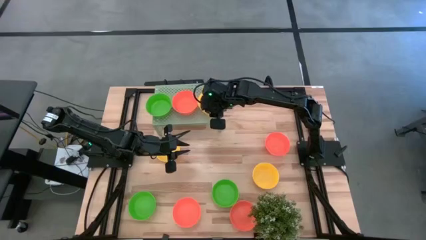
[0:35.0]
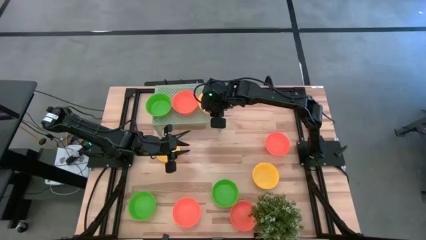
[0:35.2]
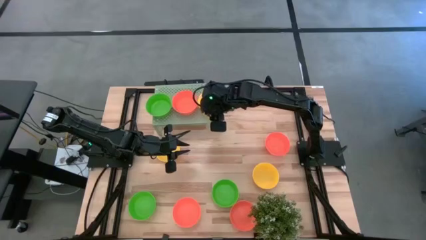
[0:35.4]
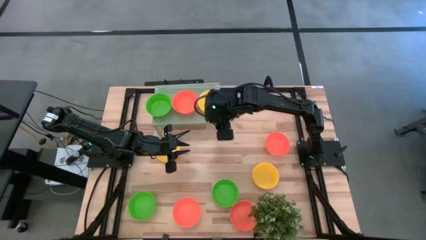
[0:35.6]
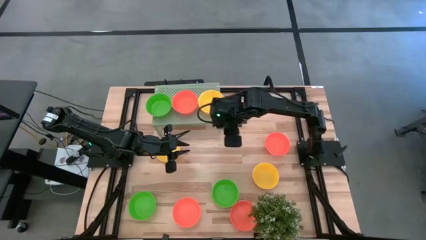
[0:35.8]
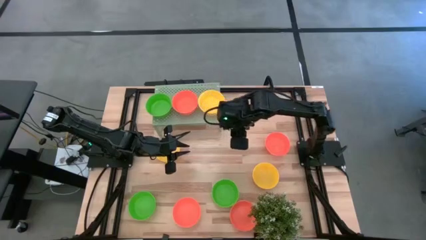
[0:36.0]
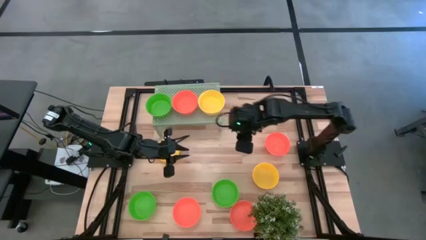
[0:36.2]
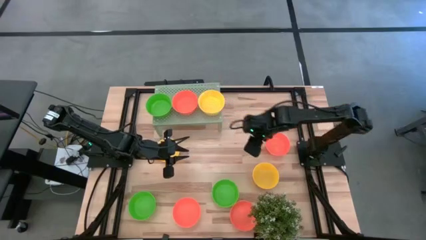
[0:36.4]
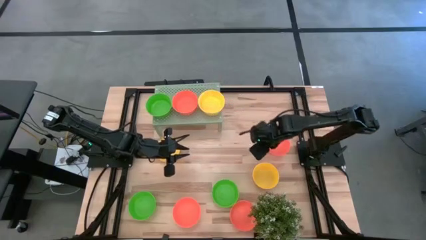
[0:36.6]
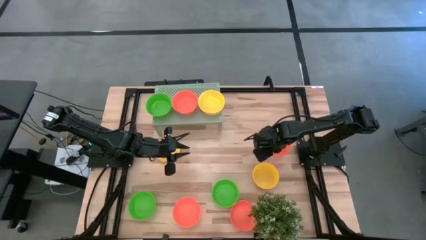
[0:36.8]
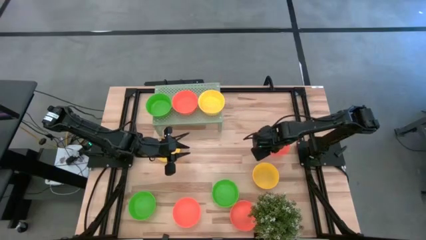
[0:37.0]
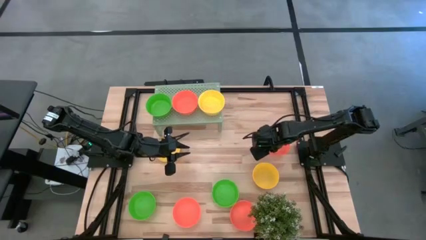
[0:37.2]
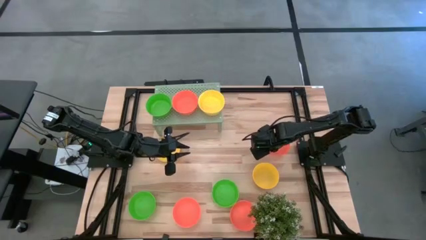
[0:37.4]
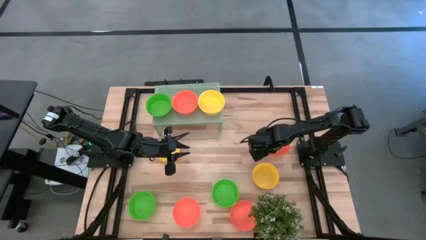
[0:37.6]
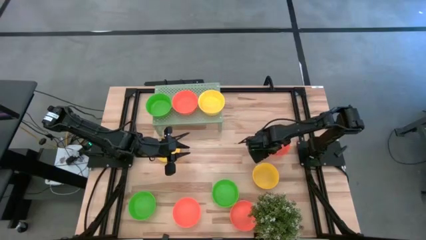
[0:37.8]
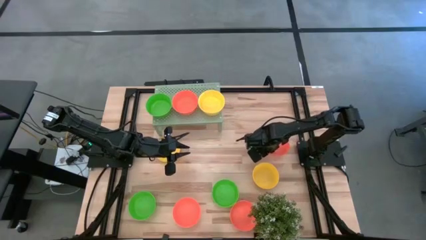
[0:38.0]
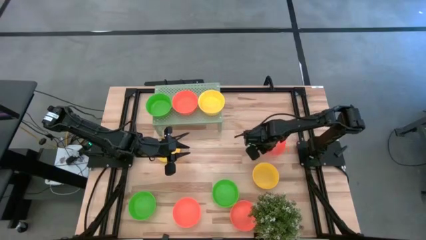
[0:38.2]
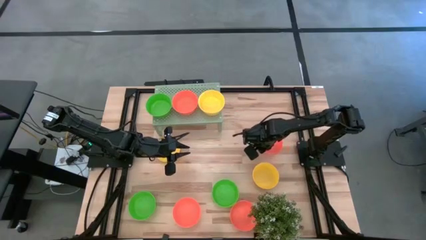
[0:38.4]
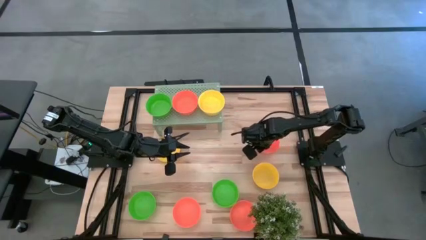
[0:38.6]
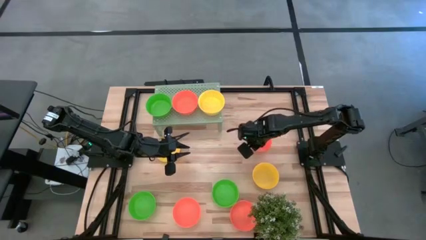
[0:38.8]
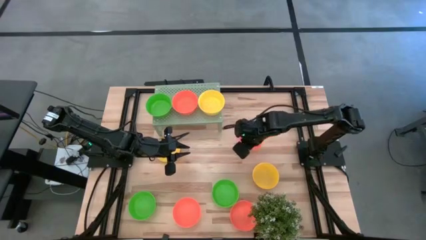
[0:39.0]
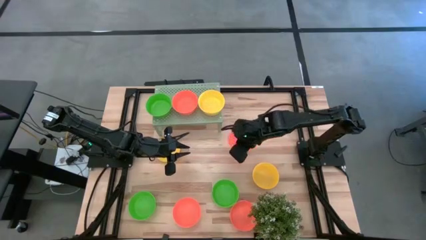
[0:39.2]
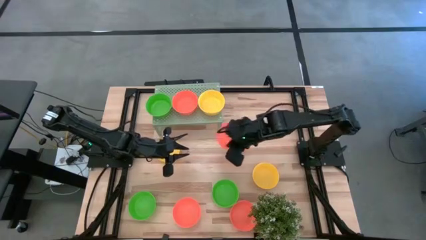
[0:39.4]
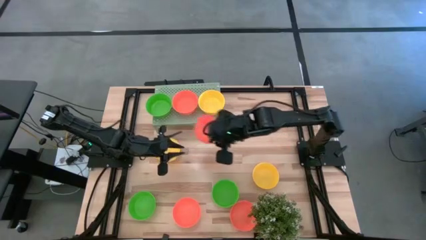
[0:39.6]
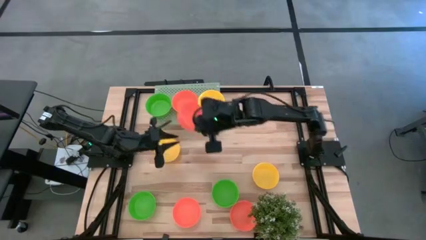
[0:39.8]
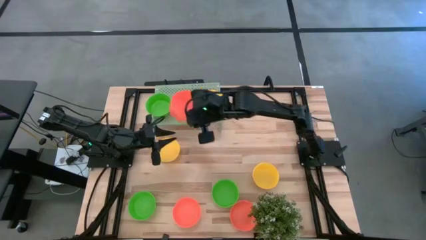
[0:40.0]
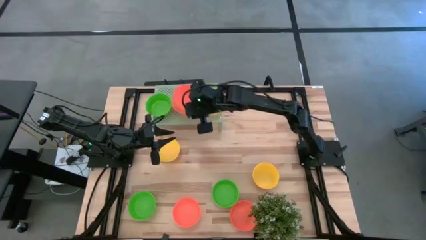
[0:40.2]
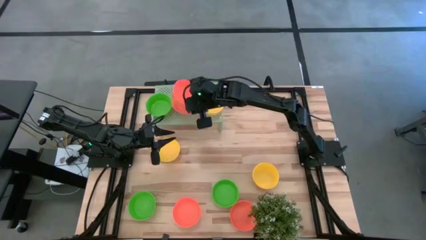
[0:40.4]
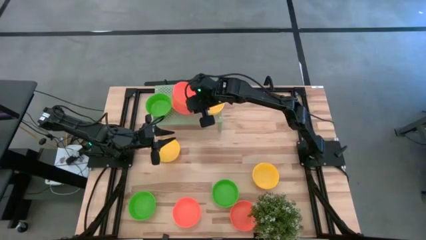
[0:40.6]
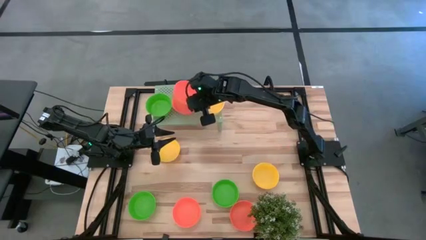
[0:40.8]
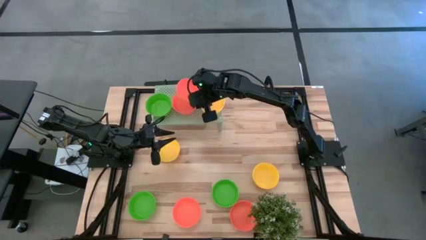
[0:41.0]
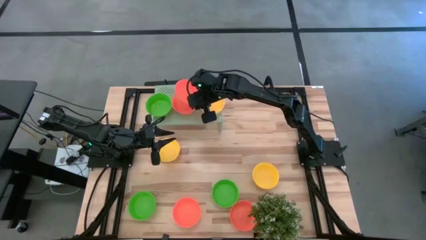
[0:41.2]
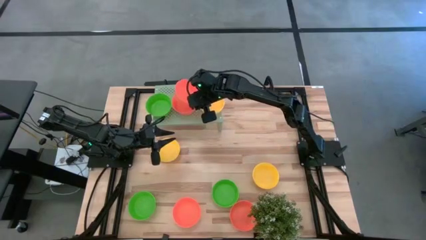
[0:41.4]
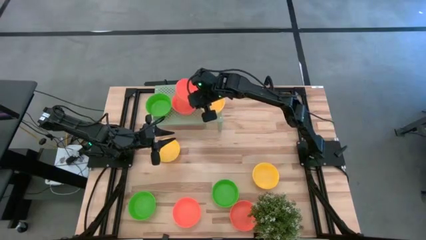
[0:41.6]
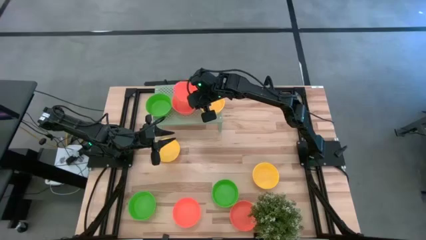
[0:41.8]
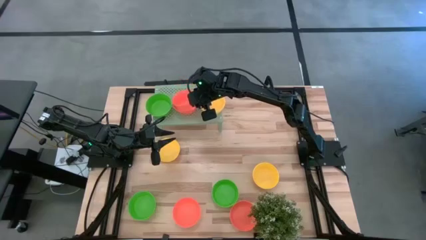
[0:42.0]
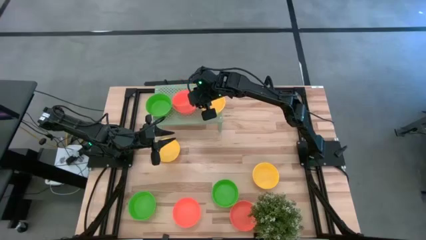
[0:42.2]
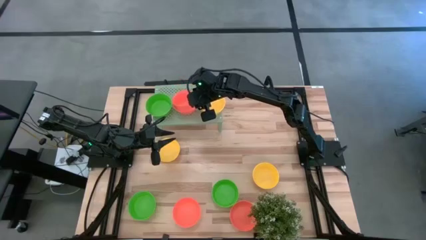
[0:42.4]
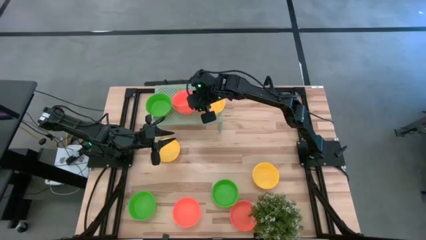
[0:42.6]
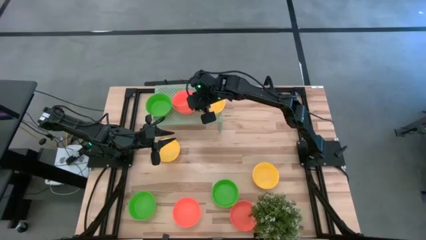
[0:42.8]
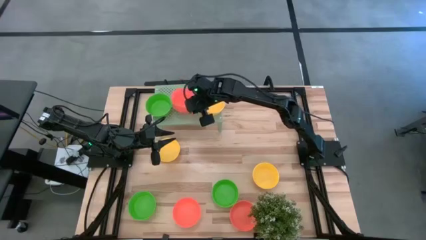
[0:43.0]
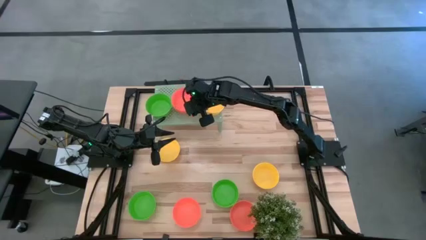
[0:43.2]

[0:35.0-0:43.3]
Task: Pick & Place Mini bowls
Stack the orange bowl on the orange bowl on the shelf

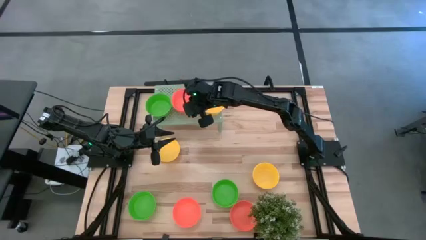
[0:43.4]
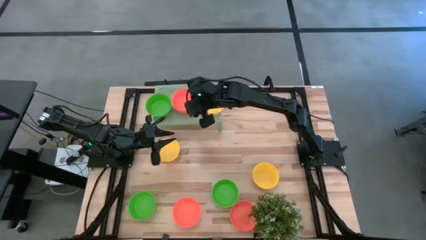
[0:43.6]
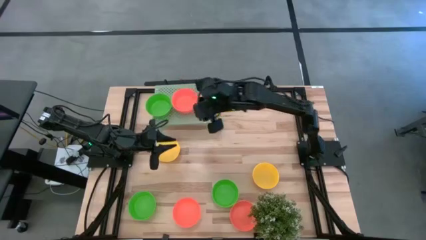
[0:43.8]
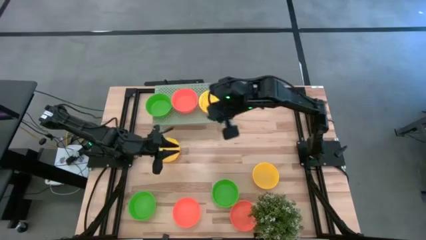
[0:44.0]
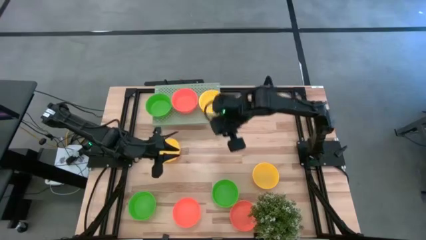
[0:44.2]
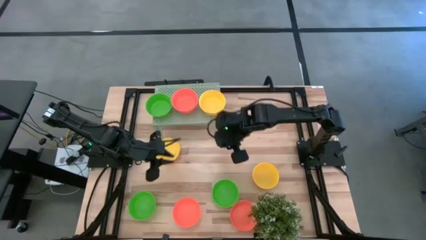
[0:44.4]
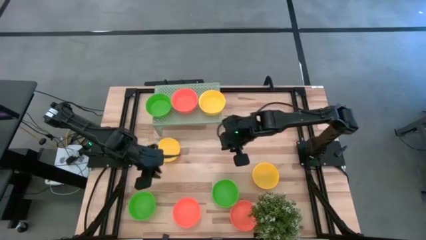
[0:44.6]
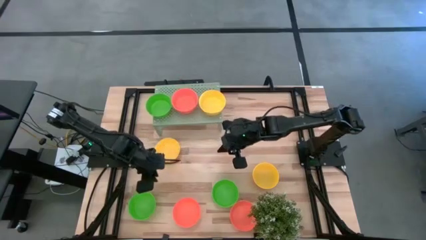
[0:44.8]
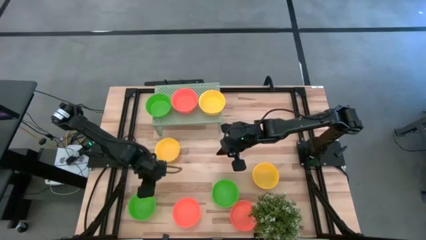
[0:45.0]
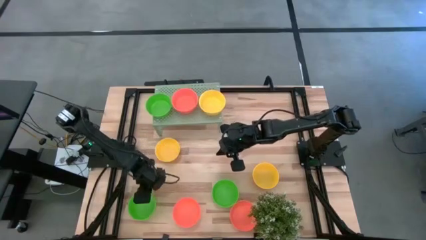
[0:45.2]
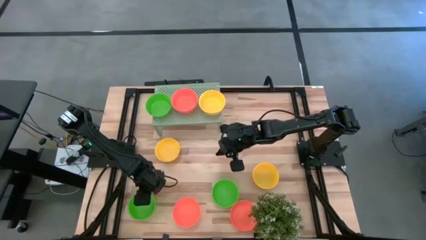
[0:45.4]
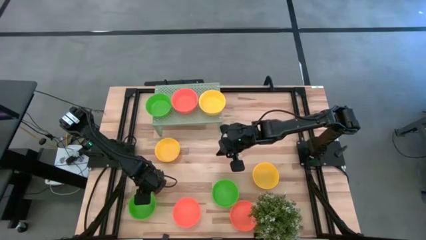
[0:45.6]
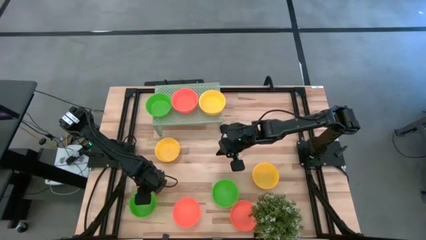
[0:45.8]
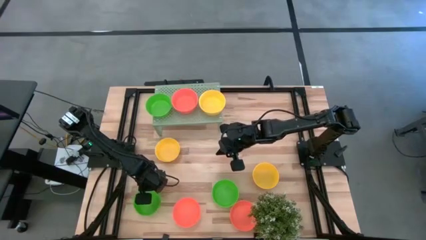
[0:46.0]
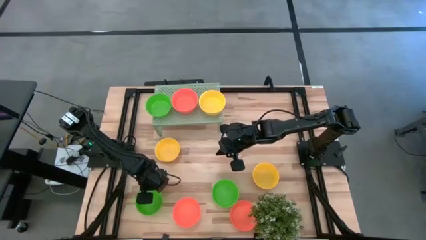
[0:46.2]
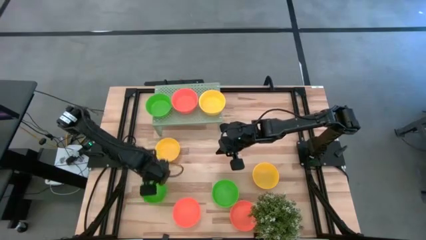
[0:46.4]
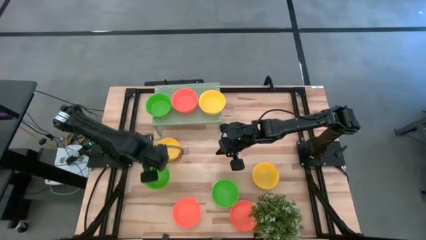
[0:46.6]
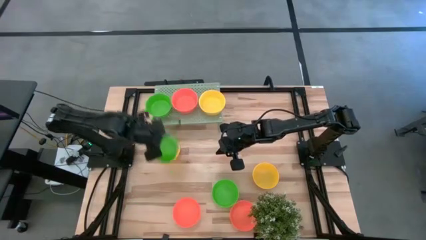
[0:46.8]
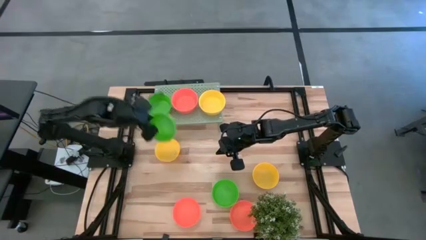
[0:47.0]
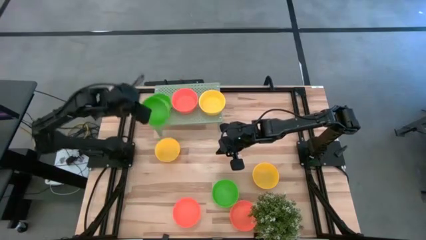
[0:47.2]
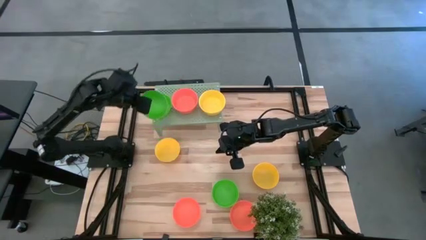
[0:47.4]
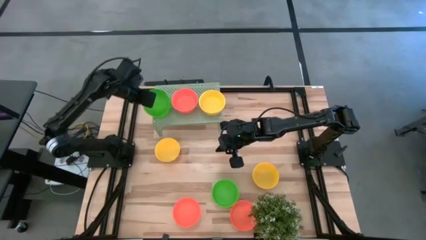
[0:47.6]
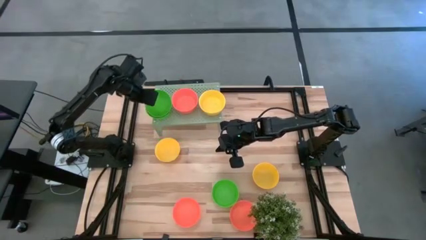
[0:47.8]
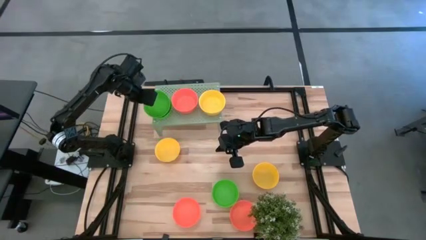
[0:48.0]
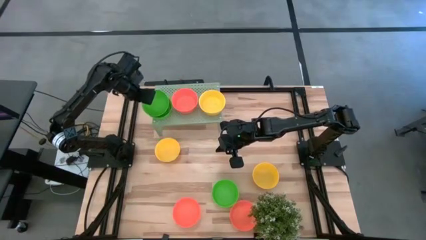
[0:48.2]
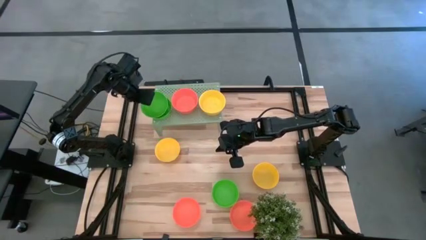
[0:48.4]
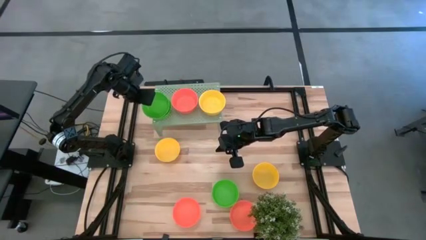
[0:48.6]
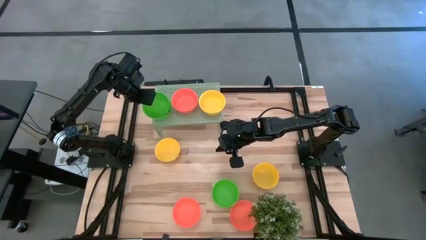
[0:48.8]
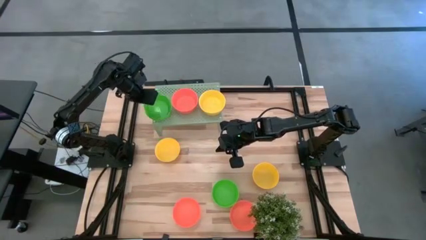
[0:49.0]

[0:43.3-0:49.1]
Stack the green bowl on the green bowl on the shelf

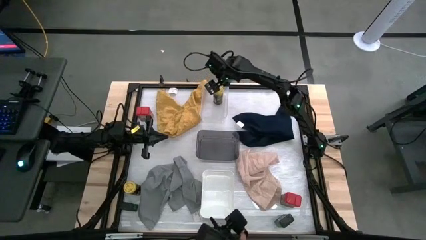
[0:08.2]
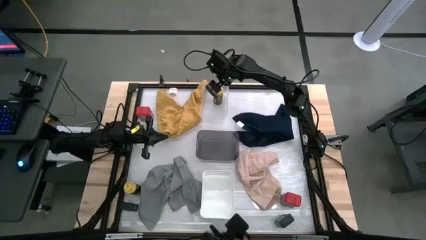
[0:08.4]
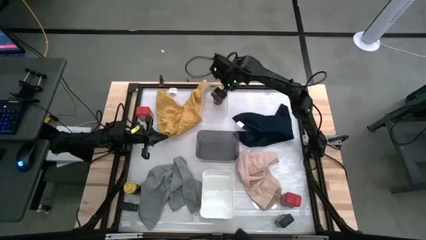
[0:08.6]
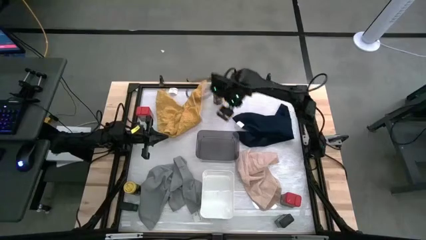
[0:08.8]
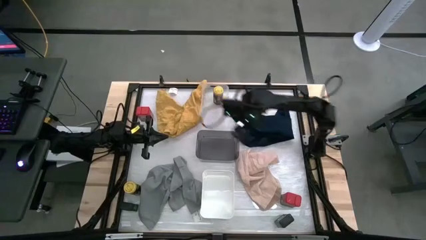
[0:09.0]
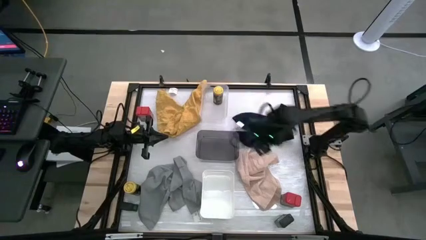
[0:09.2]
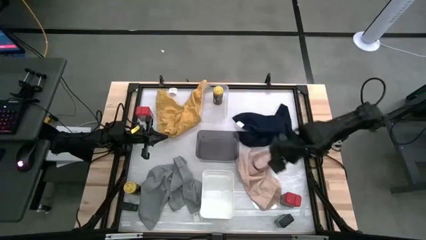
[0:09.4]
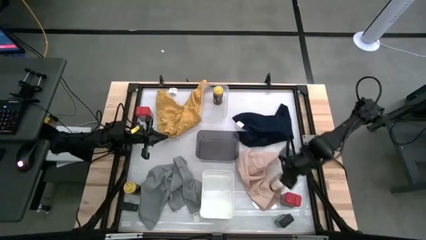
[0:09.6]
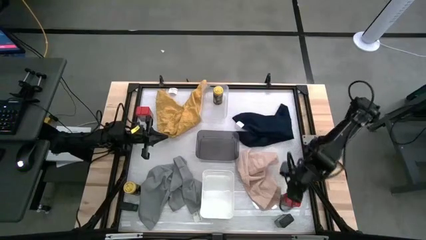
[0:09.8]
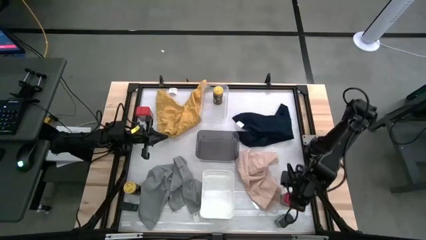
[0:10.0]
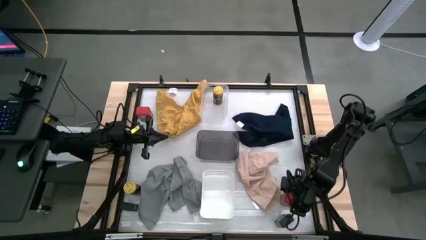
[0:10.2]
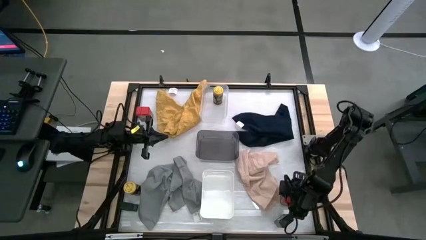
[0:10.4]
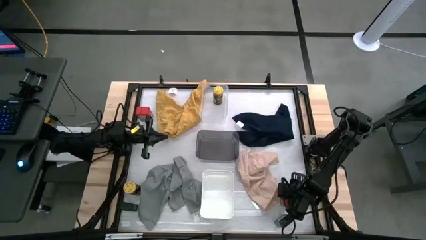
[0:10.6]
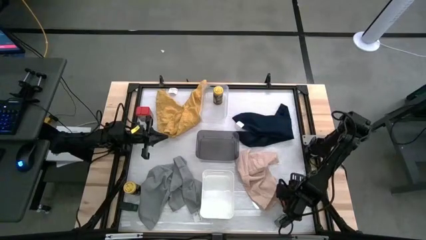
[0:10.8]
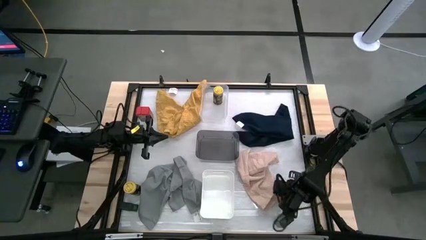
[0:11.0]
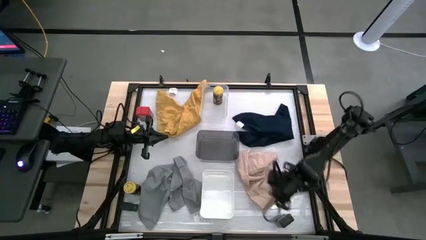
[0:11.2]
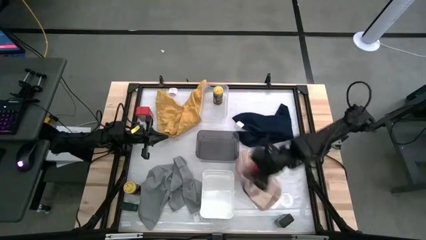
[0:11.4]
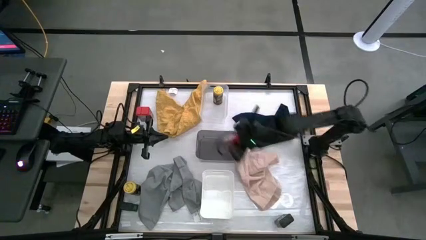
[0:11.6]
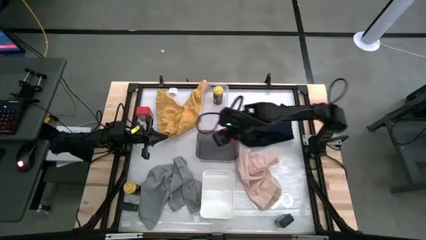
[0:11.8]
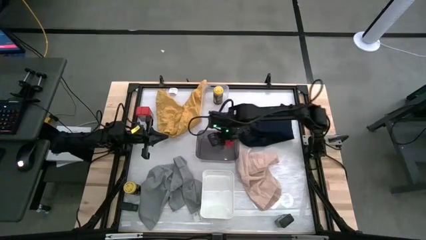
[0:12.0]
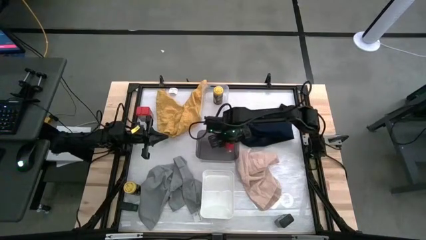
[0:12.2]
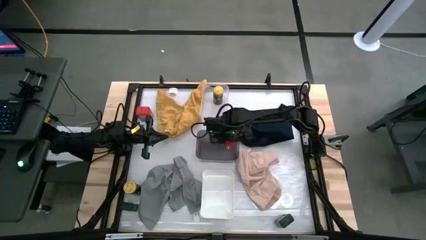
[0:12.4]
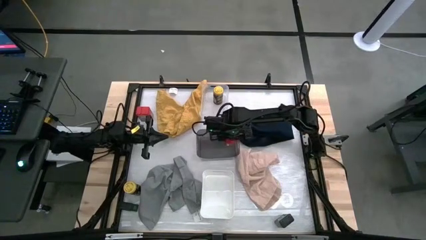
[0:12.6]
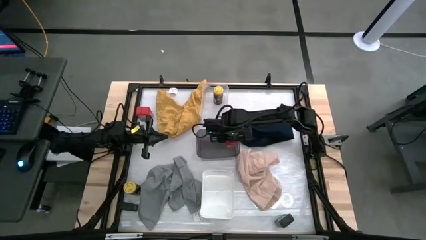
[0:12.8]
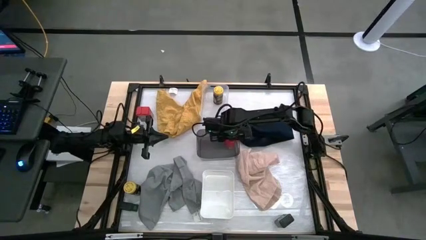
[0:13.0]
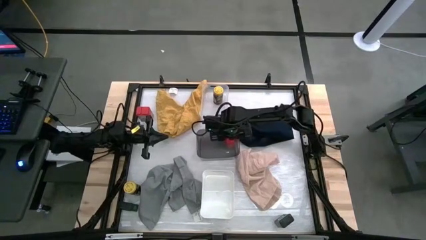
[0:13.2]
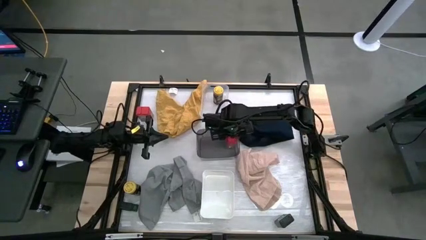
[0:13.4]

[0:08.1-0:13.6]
Task: Sort spices by type
Put the right red spice can into the black bin
